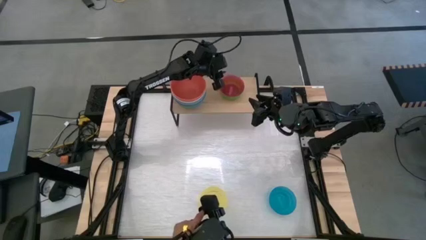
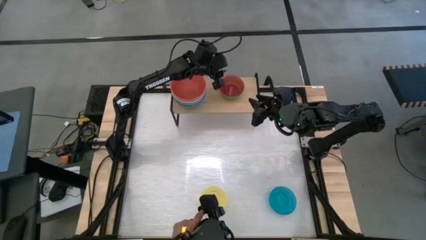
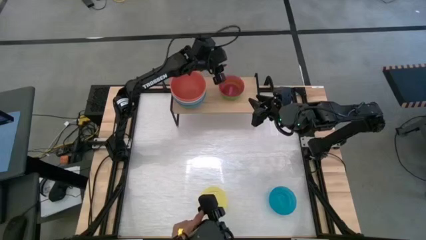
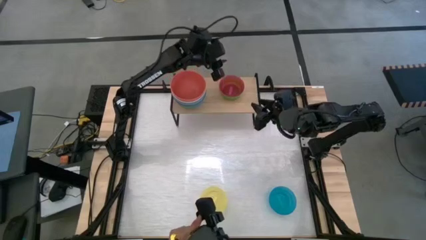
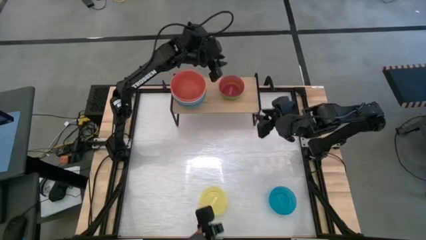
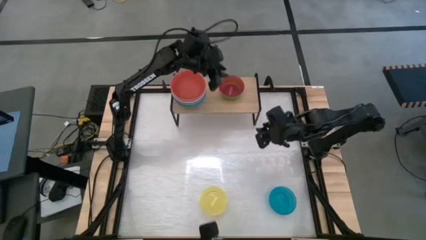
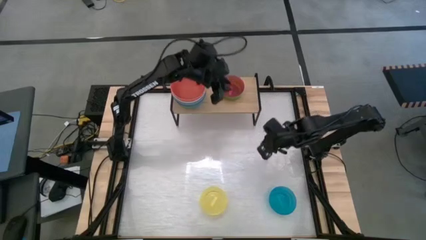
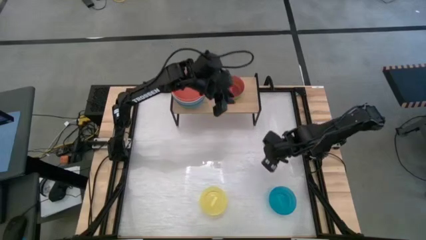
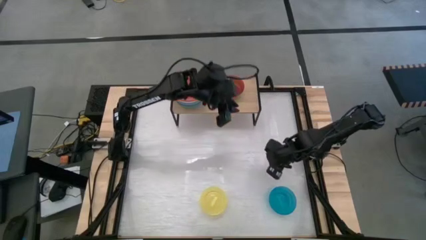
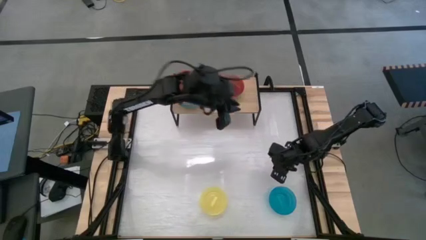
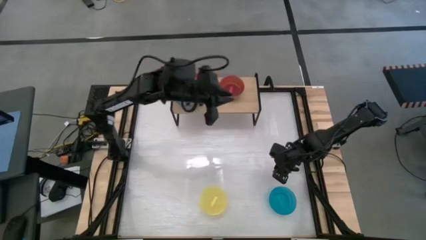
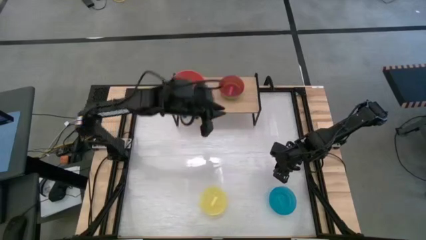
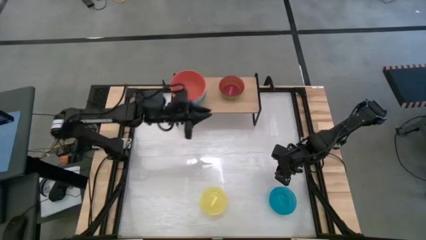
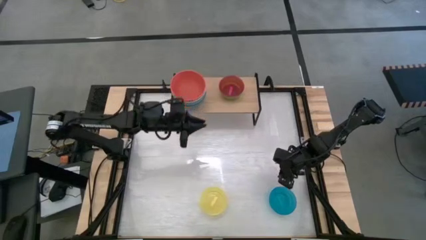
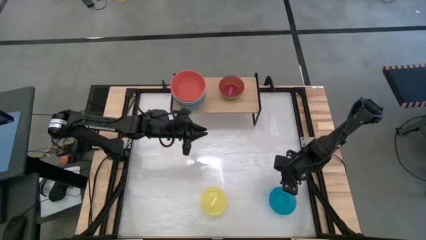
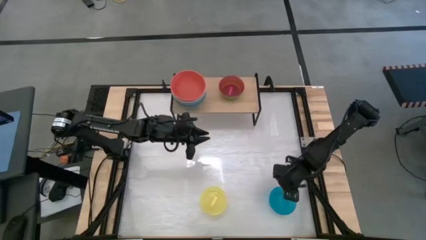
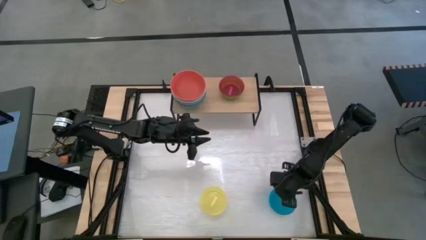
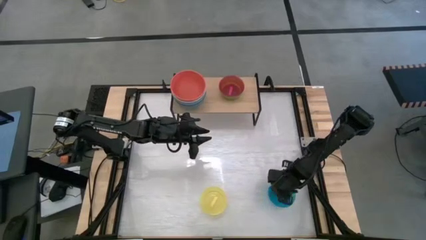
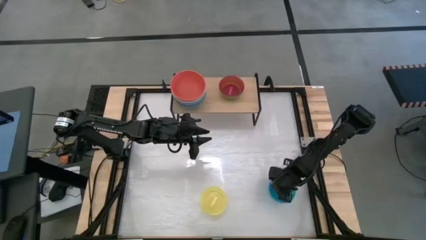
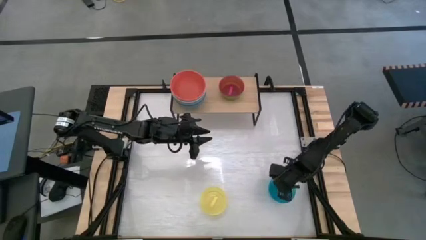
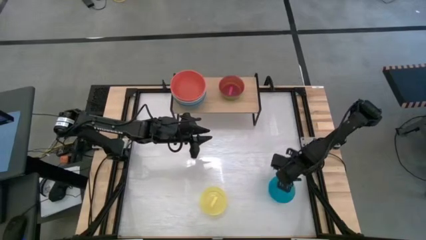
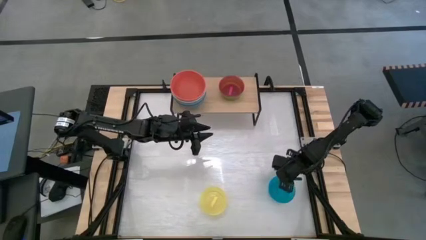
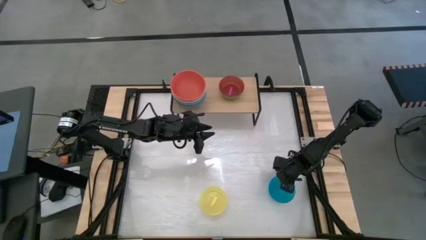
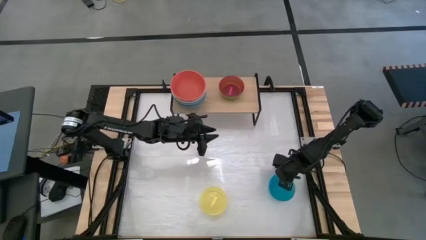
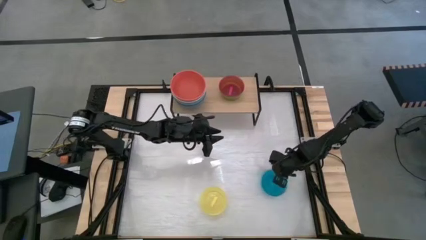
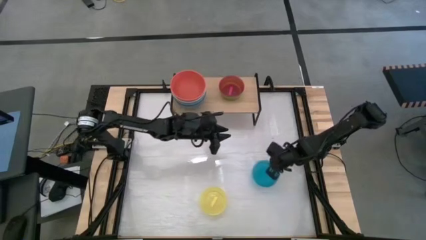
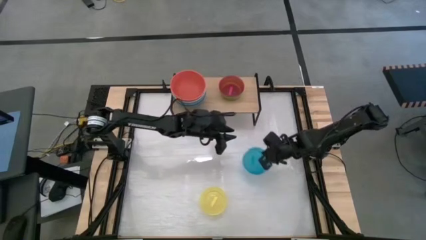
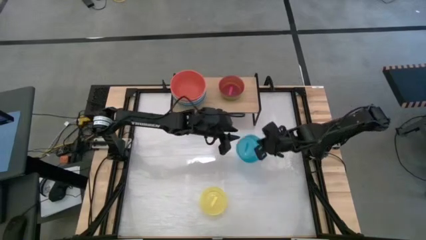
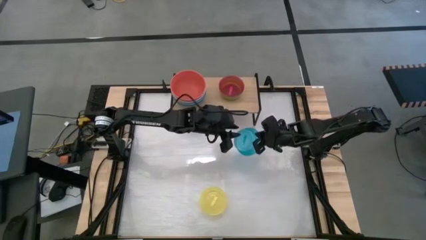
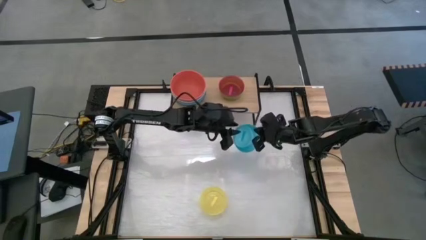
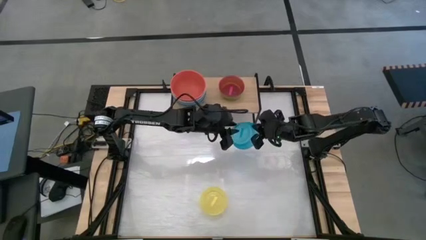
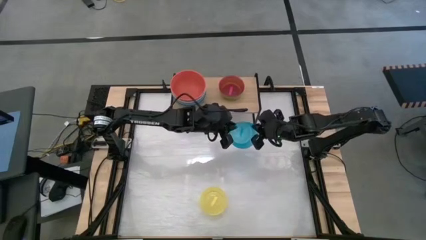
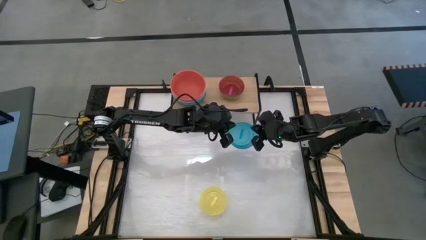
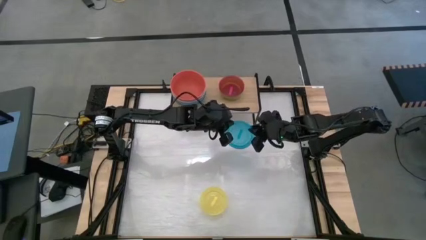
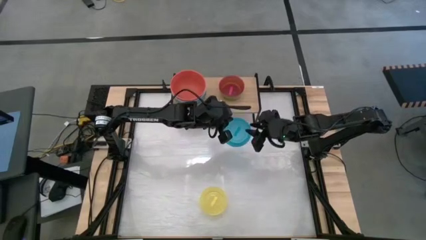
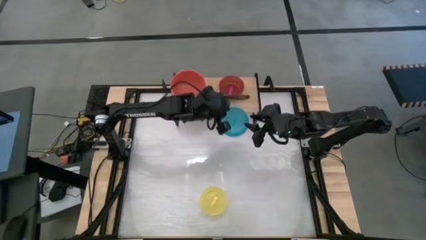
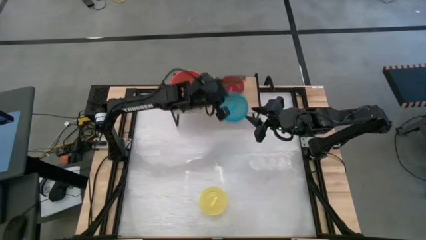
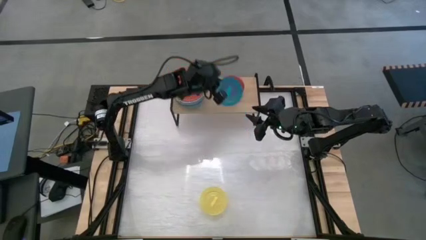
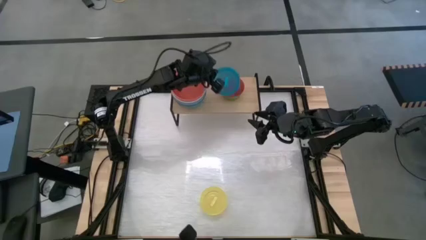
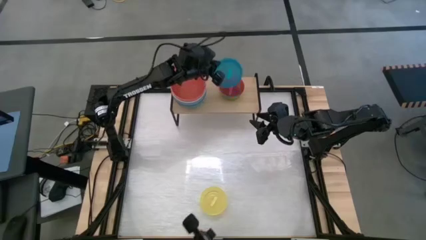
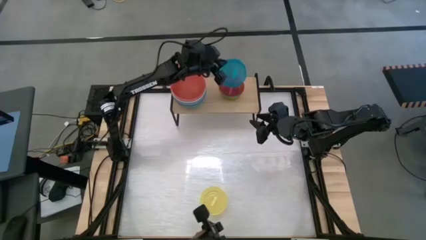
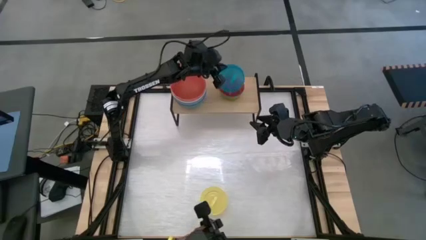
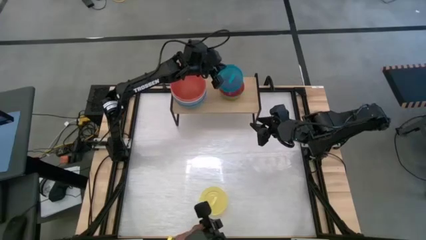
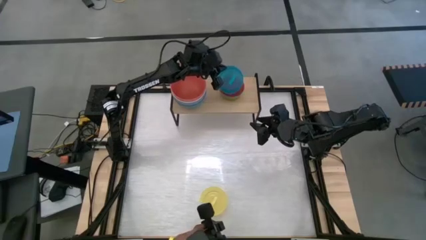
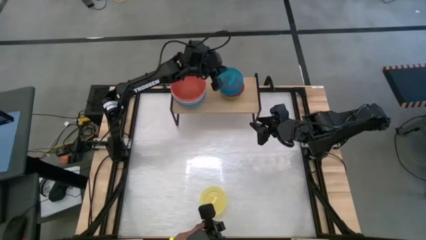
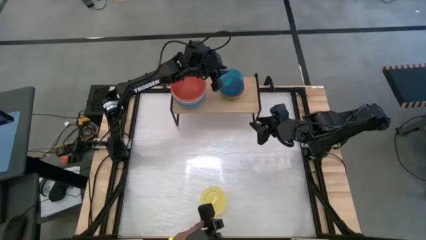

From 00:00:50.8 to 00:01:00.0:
Task: Place and stack bowls onto a shelf
Stack the transparent blue bowl on top of the transparent pink bowl on the shelf

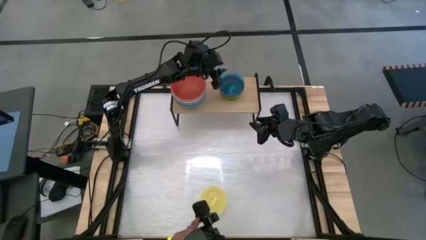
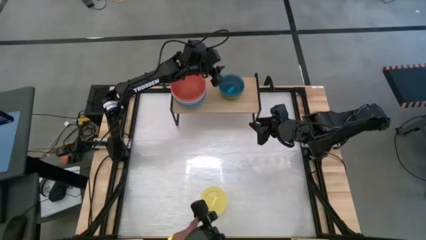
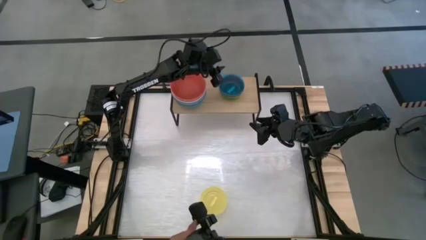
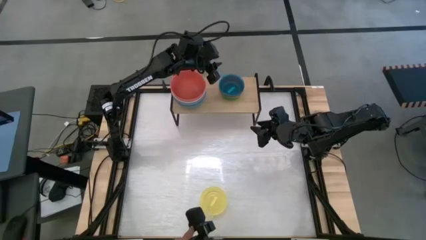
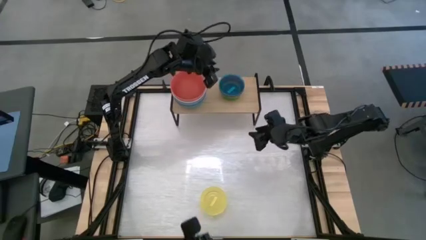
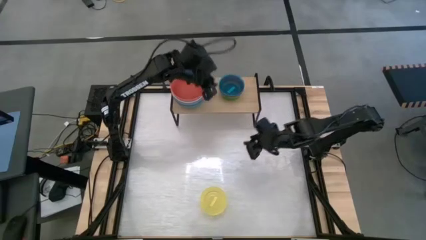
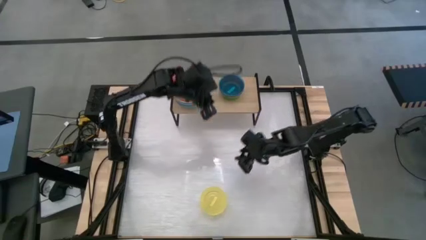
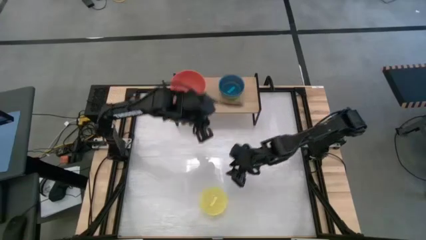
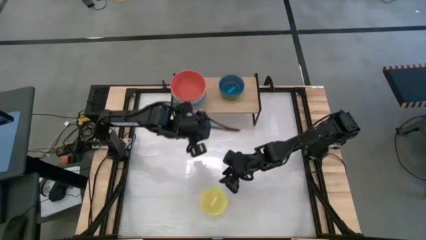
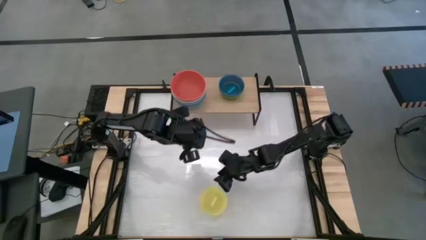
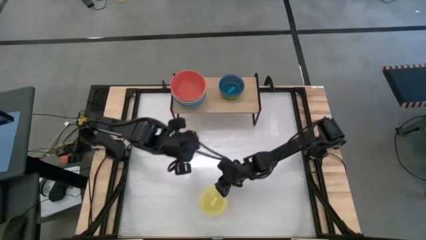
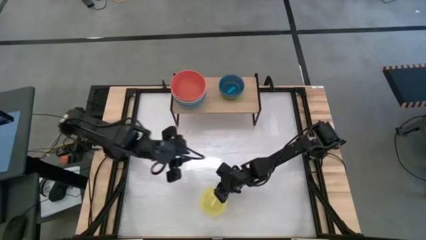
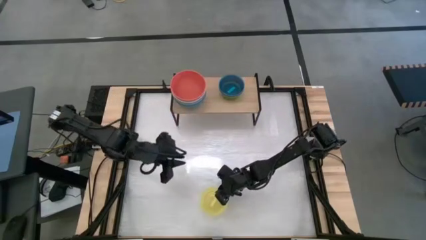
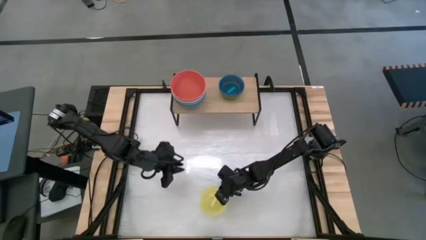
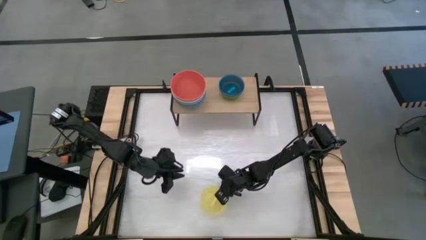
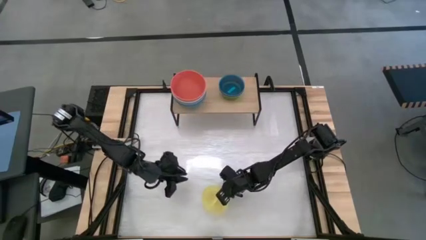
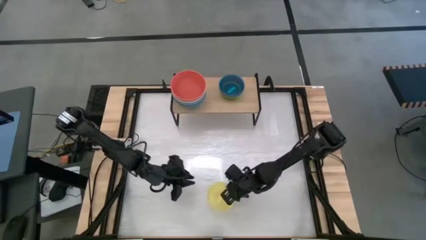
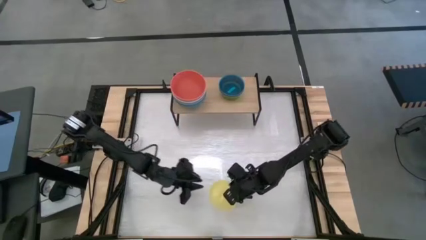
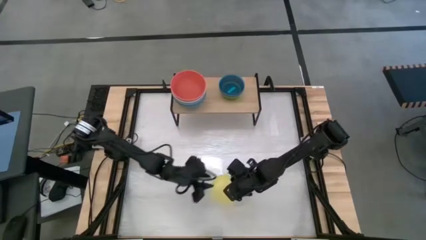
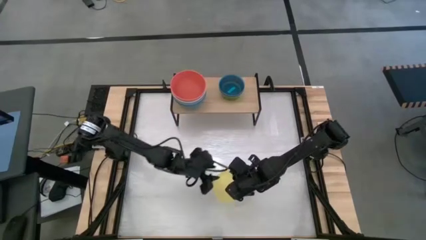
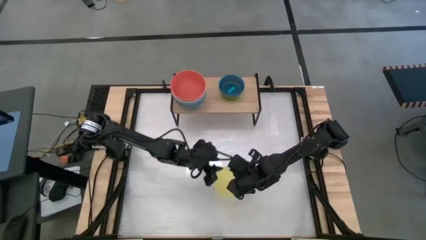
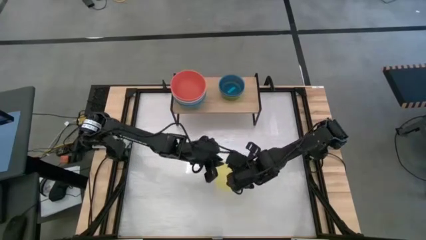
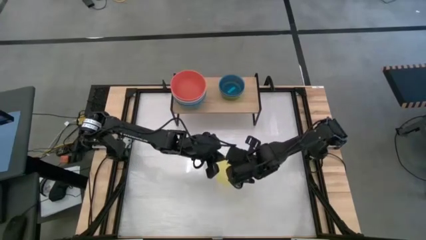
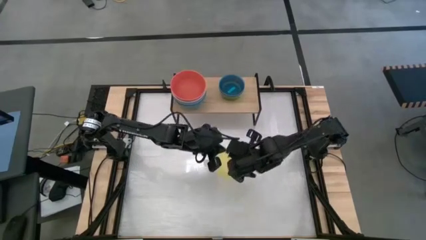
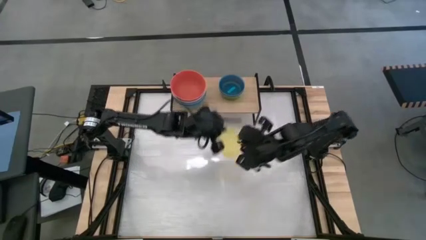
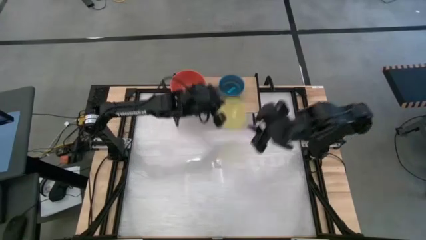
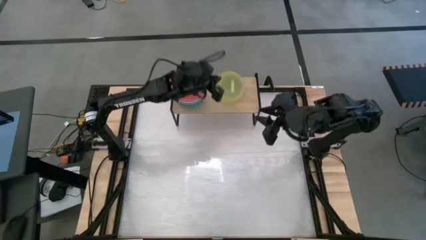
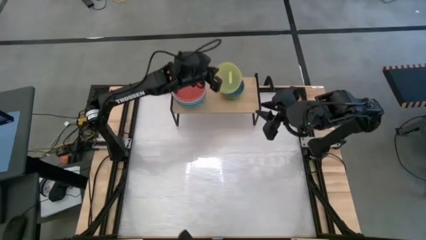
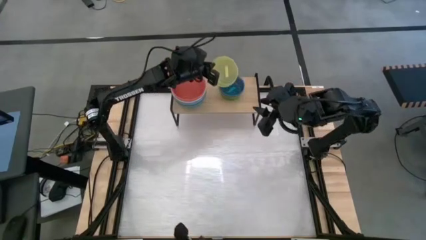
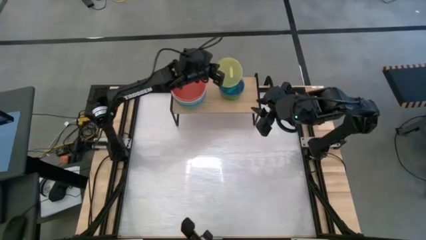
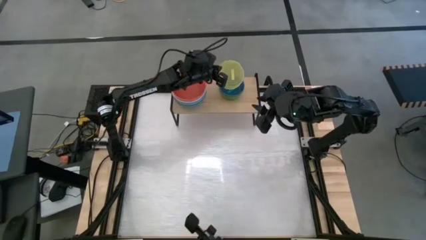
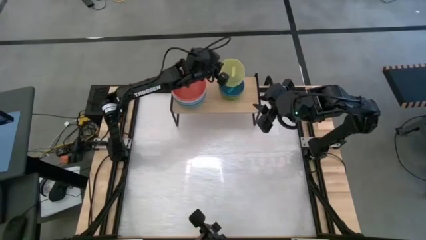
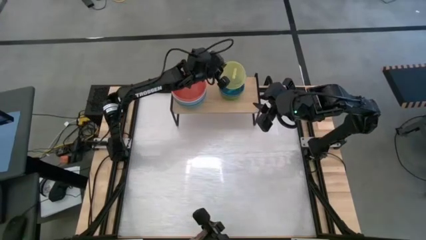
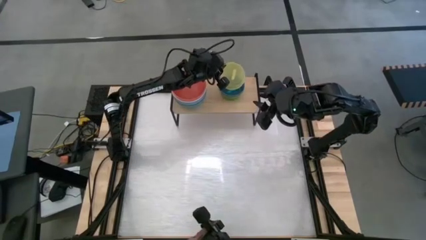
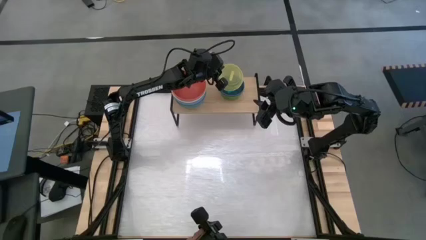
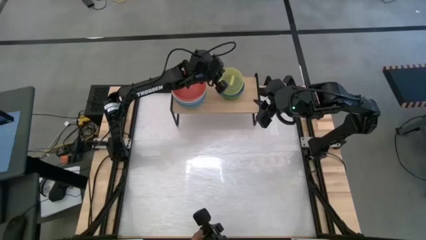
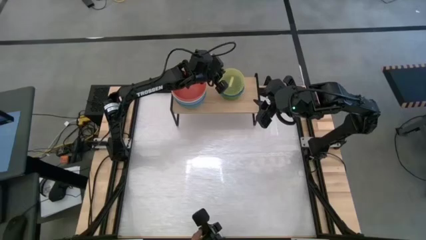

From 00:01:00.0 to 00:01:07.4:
Stack the transparent yellow bowl on top of the transparent blue bowl on the shelf
